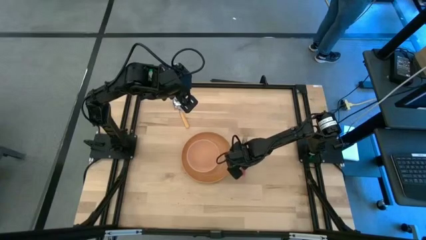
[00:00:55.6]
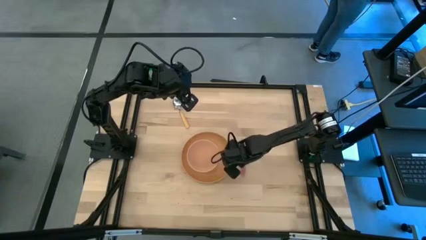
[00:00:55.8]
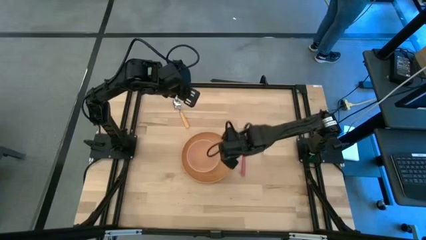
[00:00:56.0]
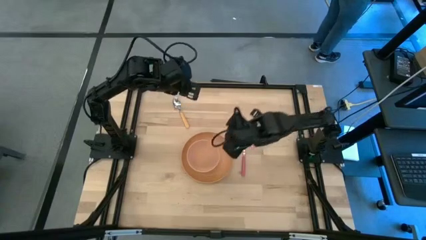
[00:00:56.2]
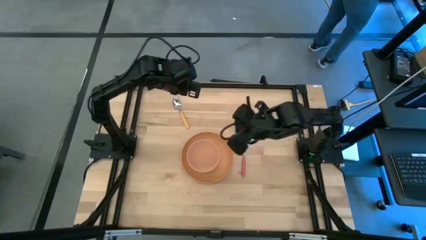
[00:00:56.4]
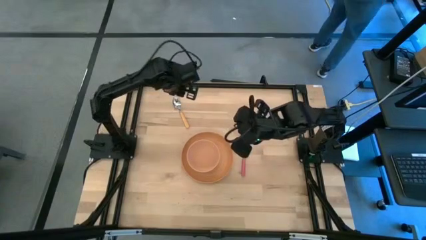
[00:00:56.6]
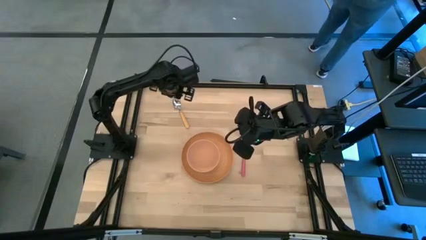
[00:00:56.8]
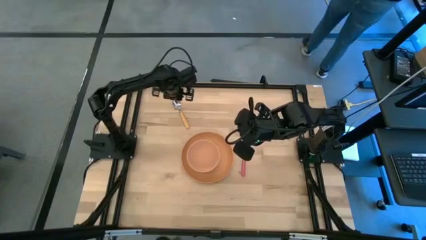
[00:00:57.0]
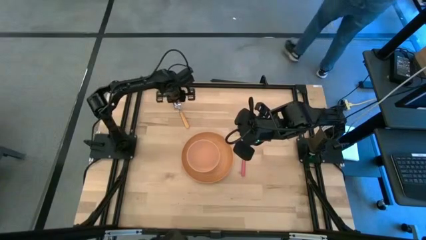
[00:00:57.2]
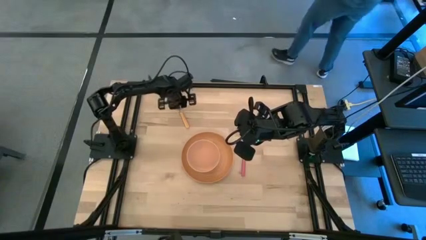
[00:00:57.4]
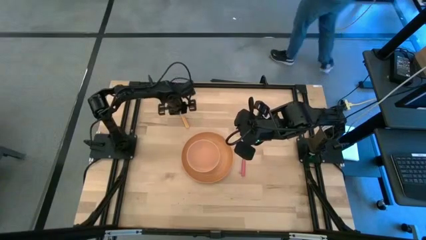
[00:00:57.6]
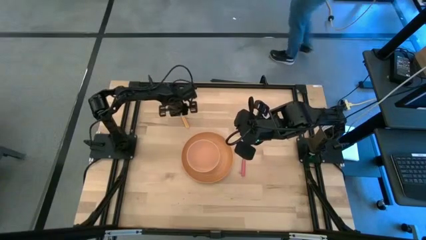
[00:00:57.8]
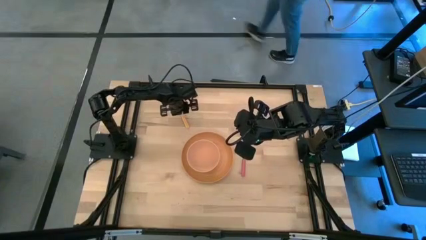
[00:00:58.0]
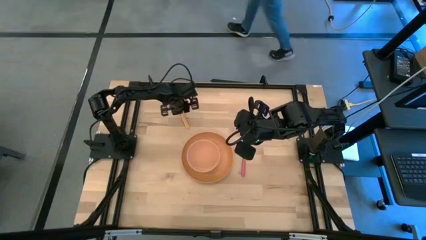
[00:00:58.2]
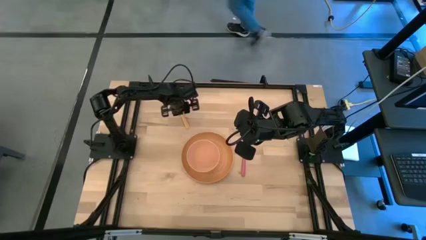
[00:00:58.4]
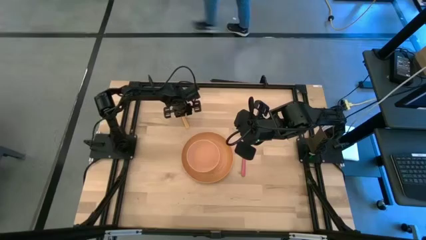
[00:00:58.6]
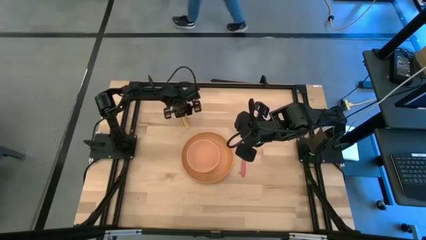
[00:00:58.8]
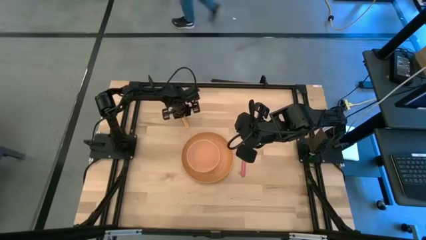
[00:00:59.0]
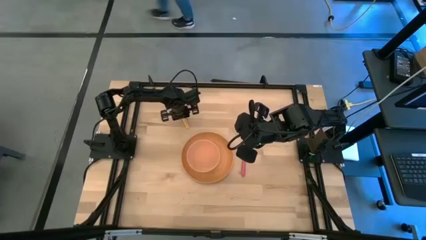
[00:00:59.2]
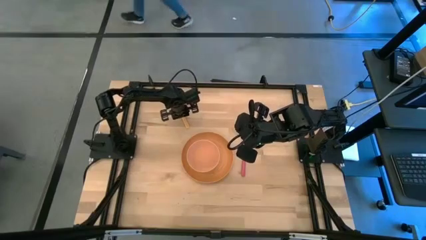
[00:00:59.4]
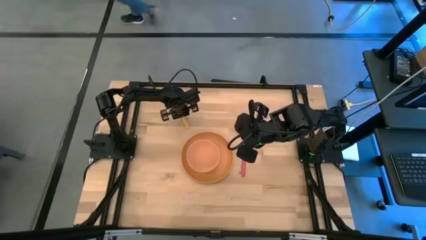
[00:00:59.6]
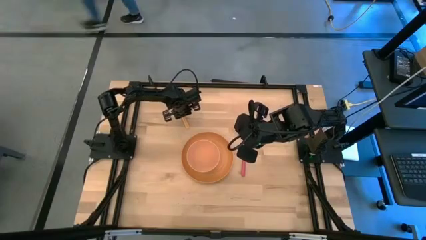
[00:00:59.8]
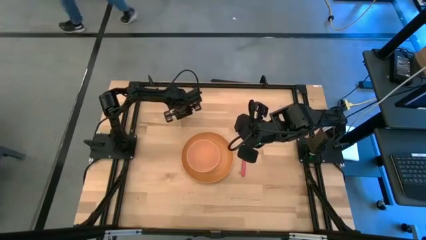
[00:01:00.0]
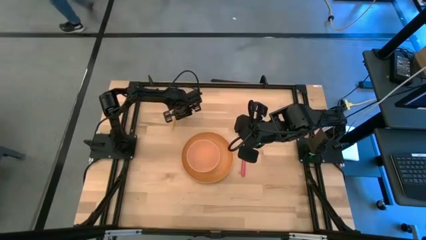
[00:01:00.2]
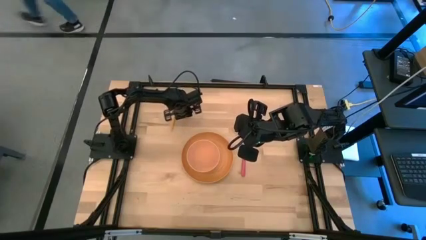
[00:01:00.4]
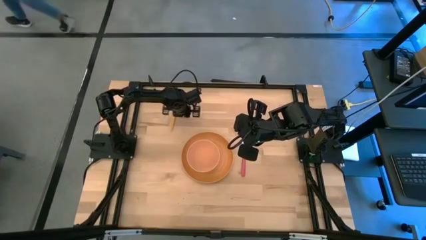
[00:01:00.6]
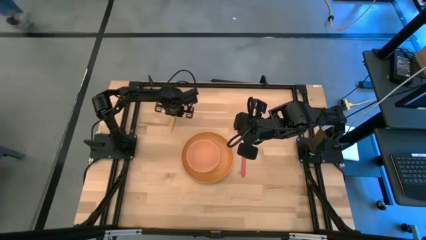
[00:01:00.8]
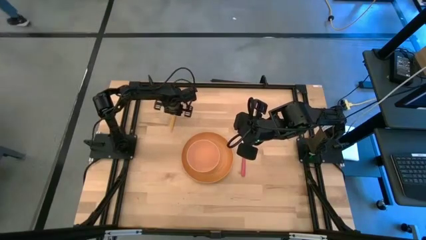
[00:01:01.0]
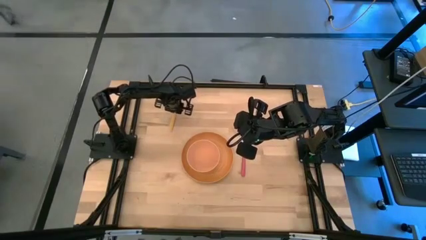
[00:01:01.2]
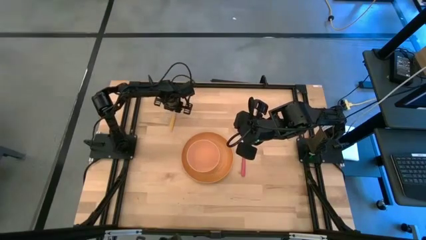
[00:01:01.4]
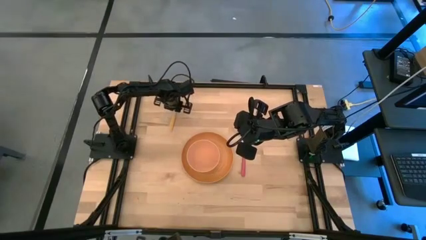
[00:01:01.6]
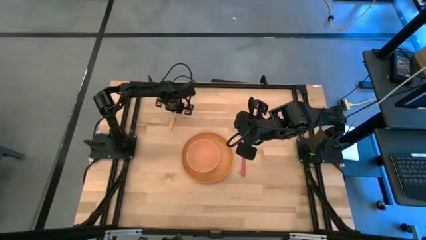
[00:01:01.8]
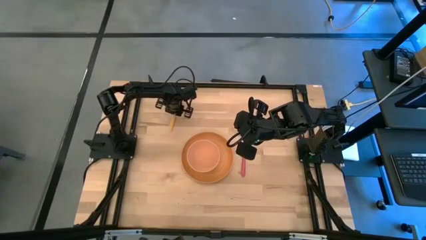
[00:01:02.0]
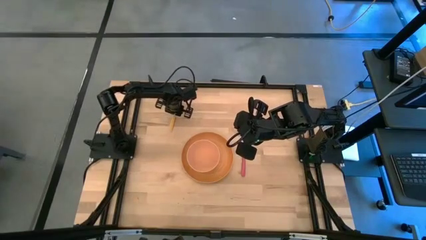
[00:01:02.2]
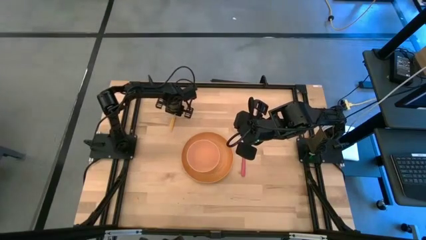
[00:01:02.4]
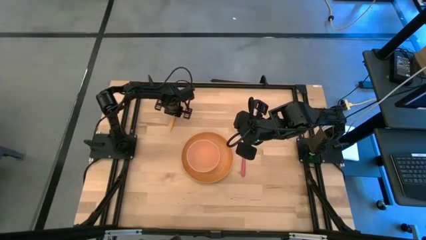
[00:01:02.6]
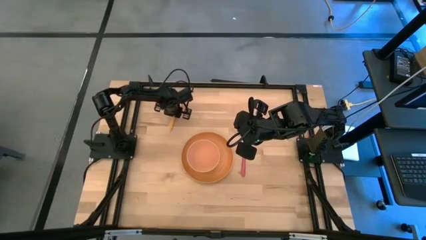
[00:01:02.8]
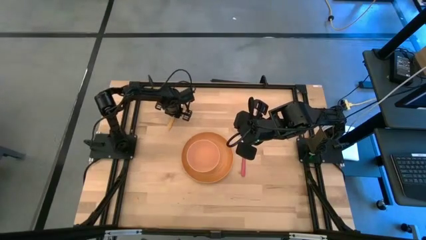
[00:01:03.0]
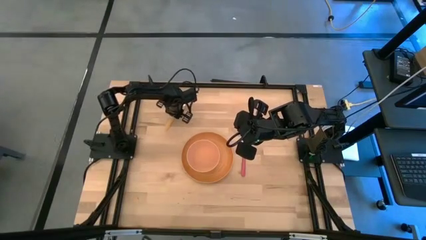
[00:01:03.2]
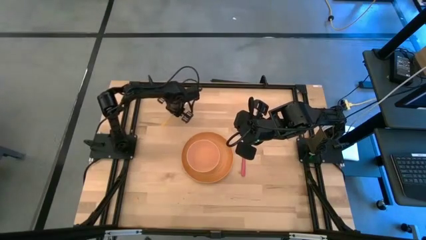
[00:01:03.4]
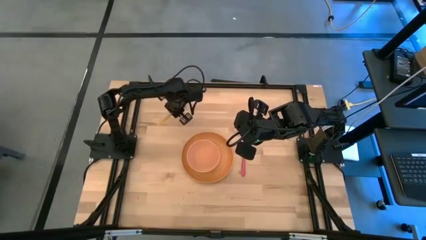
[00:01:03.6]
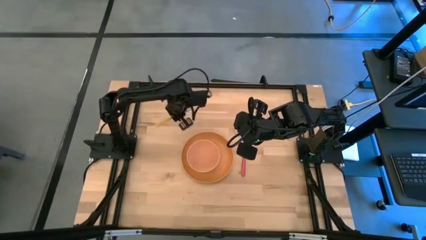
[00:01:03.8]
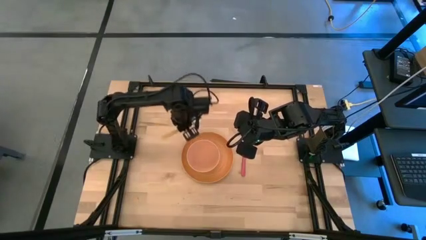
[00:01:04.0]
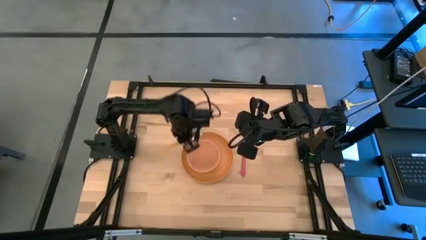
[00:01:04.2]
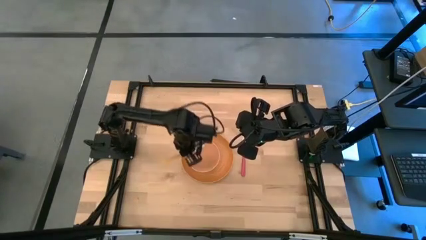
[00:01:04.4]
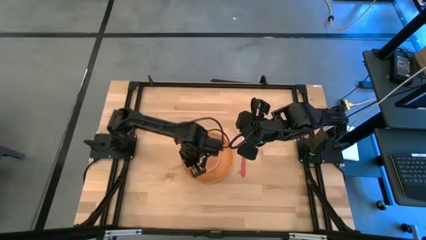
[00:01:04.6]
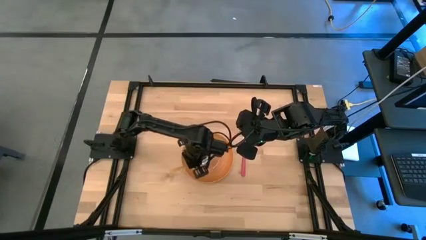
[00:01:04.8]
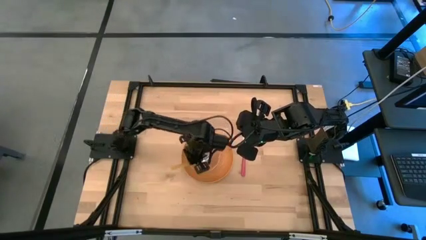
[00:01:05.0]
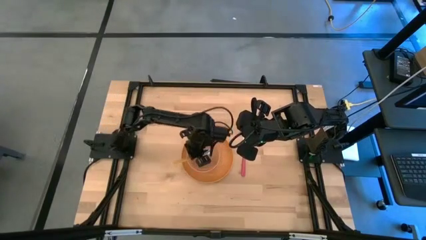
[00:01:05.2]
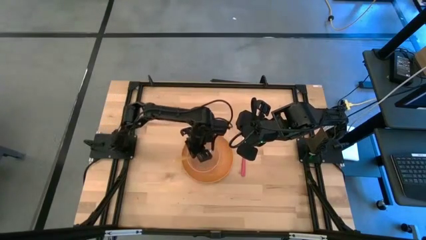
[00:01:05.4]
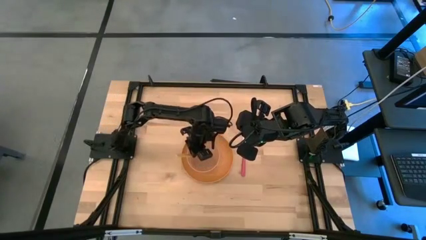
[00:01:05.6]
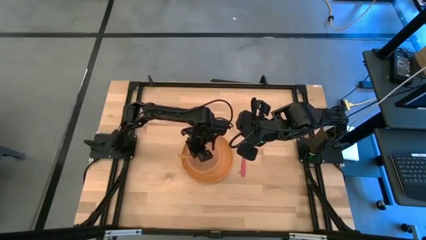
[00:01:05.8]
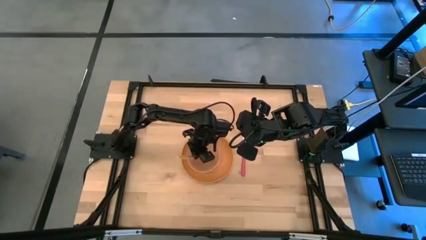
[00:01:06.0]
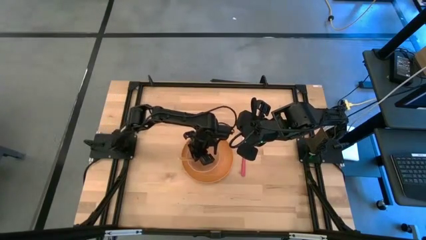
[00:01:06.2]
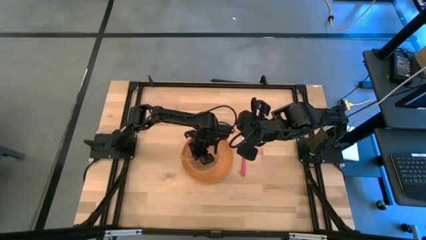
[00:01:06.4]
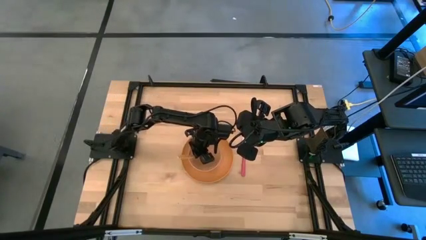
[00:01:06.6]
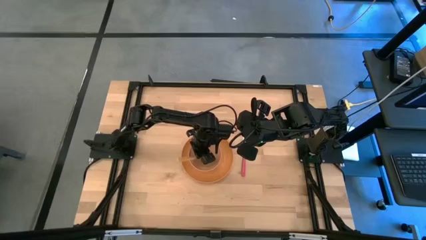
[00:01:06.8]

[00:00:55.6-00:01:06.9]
Task: Set table place
Put the light yellow spoon into the orange bowl

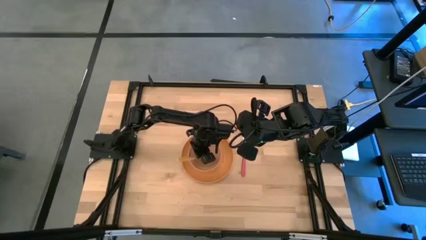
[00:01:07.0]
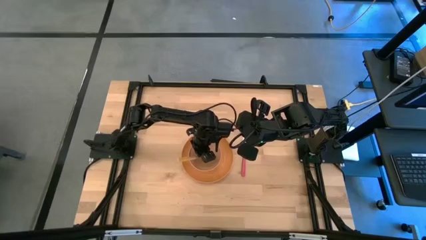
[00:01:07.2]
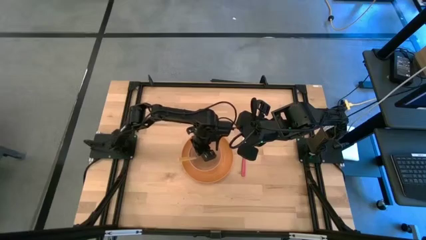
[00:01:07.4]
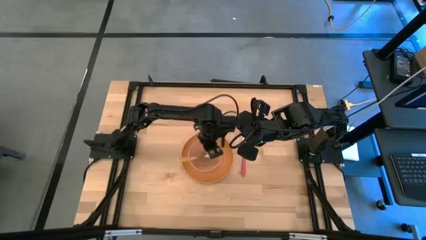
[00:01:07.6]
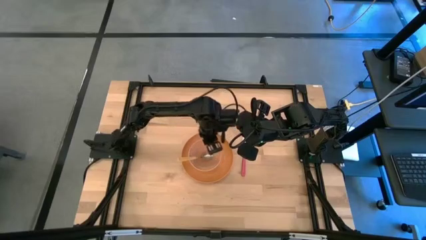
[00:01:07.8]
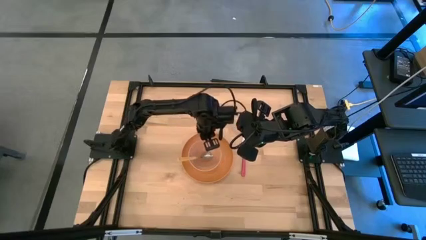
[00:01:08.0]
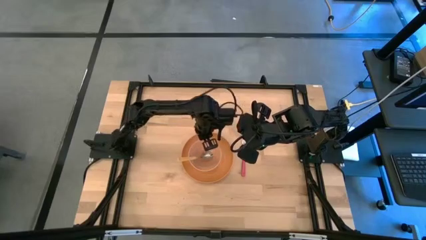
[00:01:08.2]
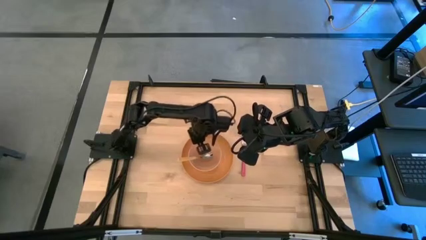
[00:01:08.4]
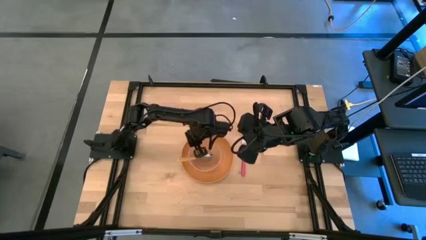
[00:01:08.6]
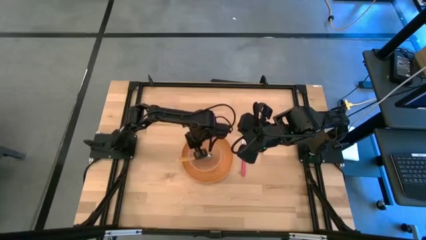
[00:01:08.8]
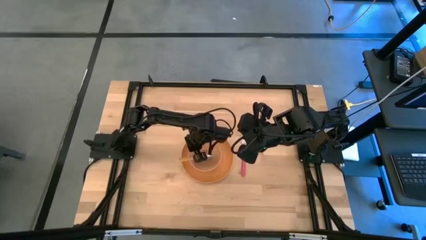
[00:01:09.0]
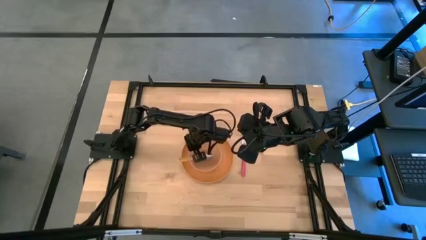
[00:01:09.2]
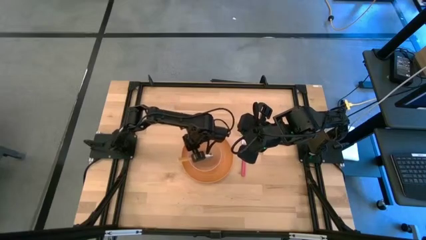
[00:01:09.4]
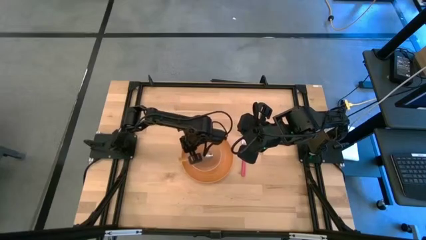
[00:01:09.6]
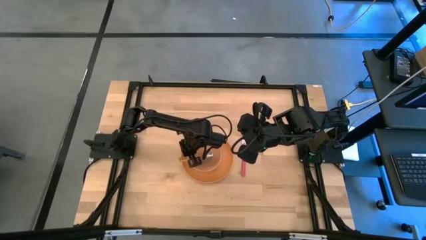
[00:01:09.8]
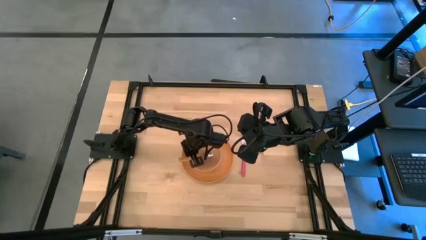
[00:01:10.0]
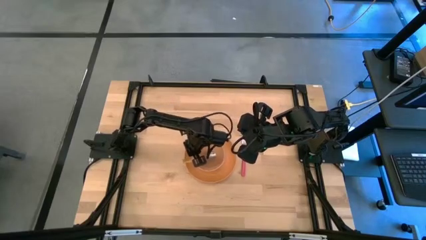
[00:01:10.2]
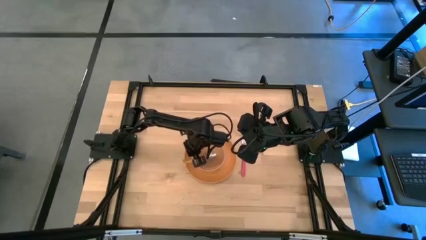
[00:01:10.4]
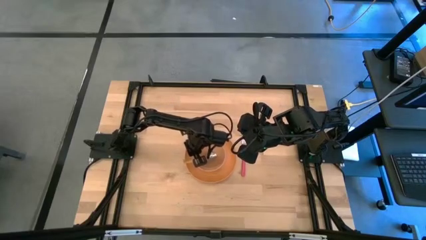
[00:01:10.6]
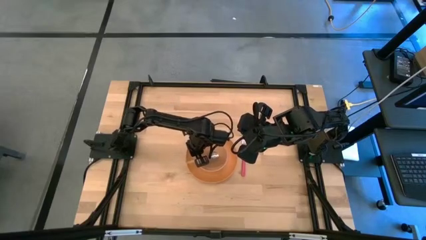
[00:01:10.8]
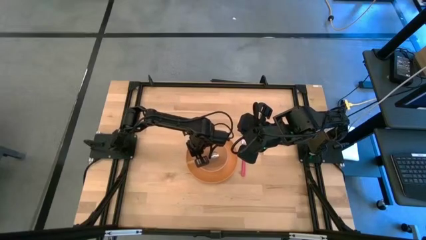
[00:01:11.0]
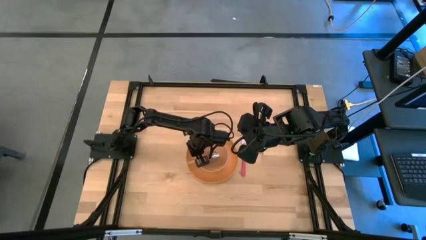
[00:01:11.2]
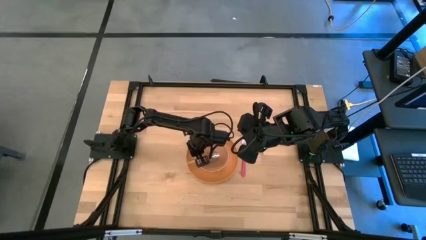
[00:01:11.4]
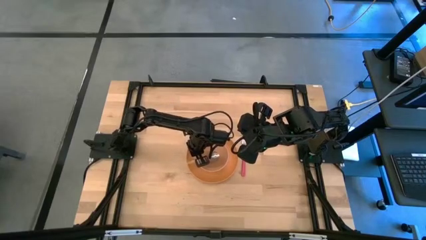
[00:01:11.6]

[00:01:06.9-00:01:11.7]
Adjust the orange bowl on the orange plate
